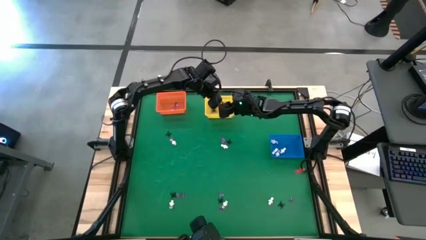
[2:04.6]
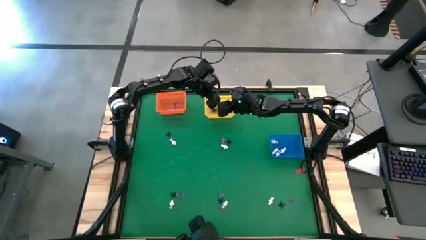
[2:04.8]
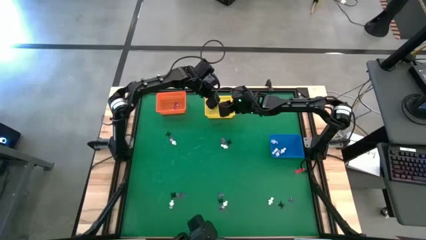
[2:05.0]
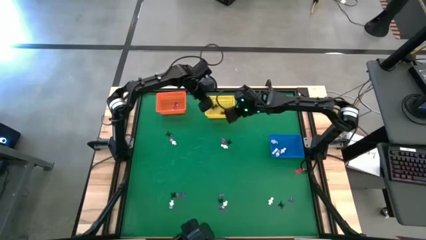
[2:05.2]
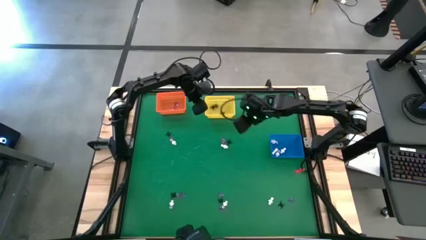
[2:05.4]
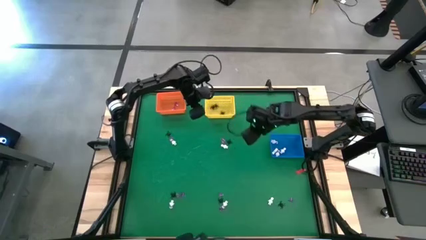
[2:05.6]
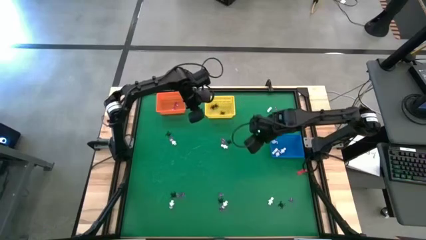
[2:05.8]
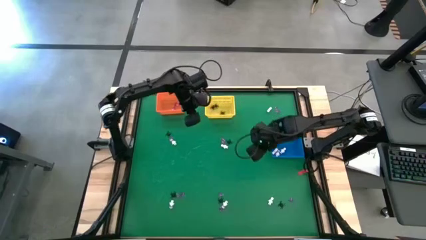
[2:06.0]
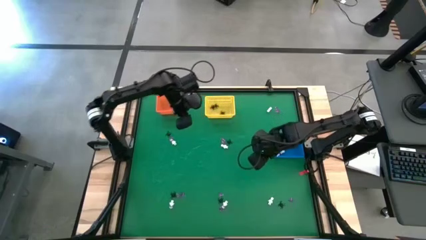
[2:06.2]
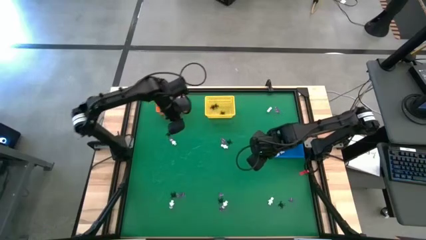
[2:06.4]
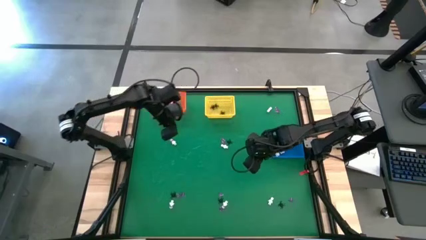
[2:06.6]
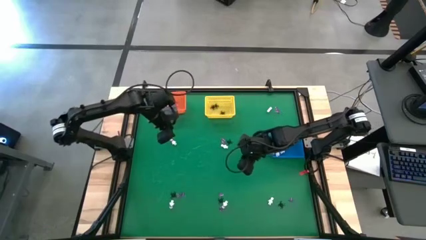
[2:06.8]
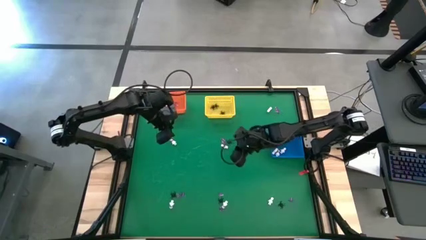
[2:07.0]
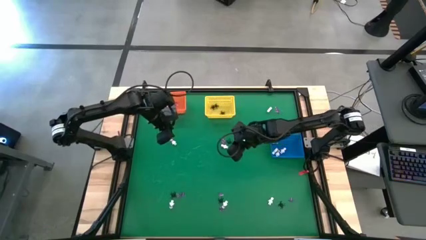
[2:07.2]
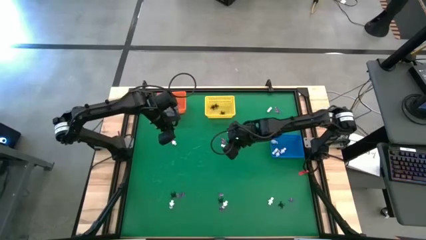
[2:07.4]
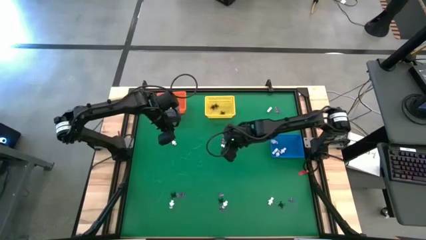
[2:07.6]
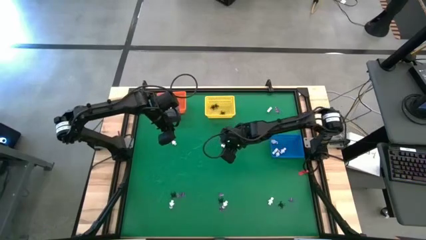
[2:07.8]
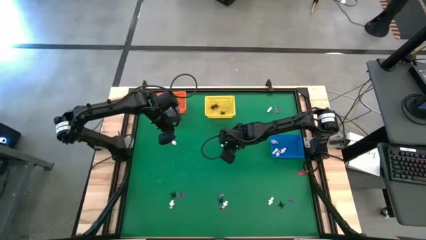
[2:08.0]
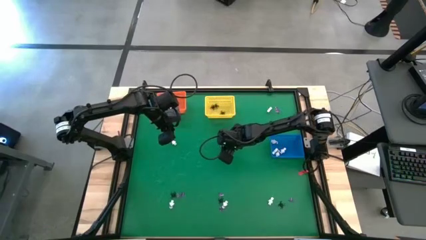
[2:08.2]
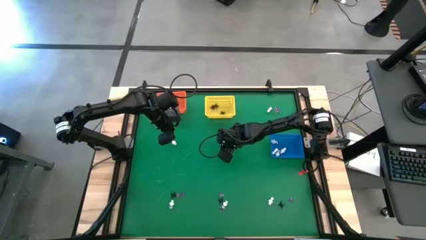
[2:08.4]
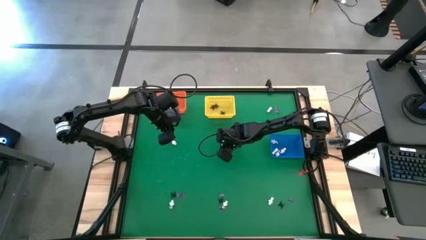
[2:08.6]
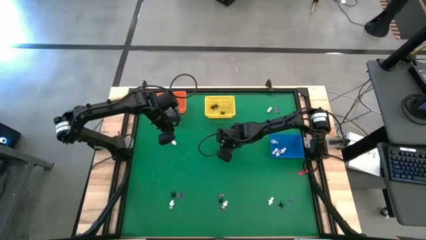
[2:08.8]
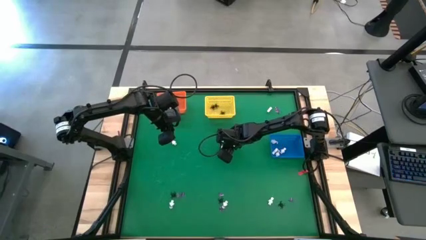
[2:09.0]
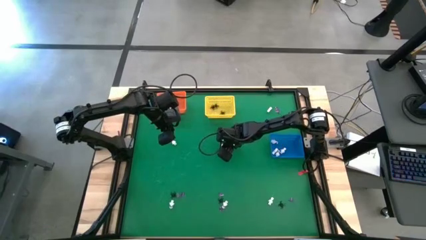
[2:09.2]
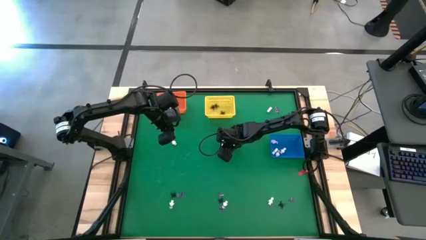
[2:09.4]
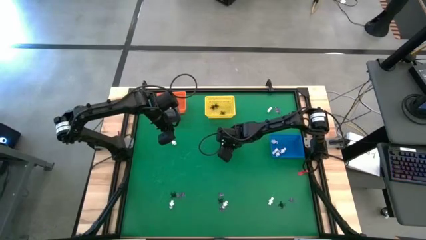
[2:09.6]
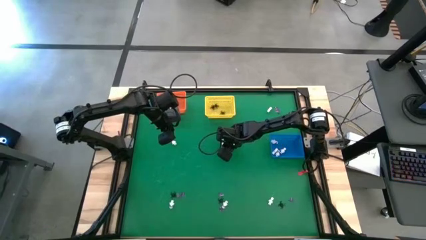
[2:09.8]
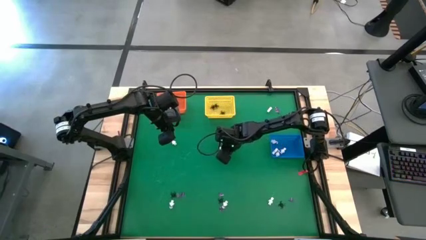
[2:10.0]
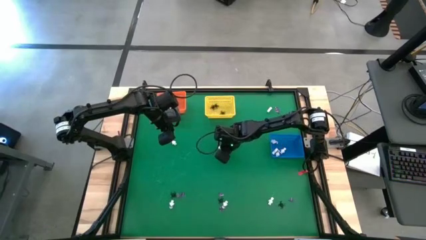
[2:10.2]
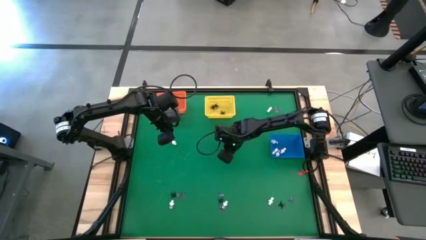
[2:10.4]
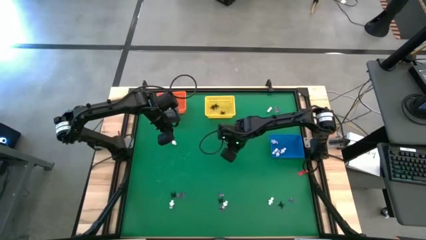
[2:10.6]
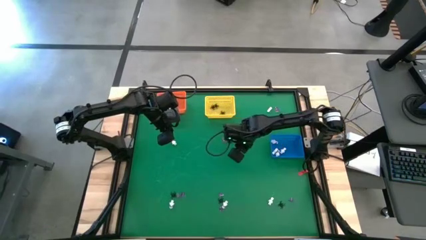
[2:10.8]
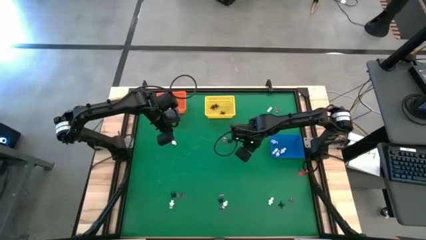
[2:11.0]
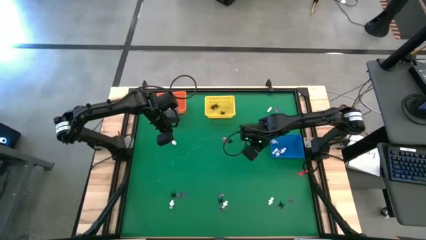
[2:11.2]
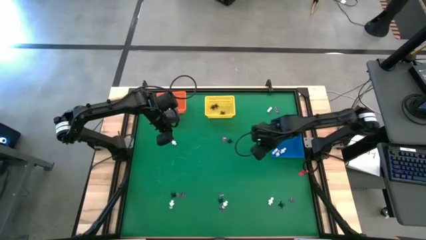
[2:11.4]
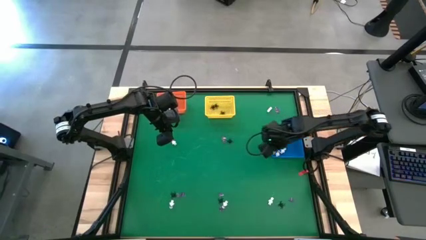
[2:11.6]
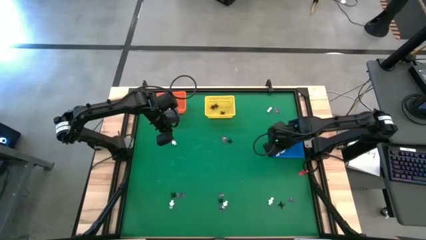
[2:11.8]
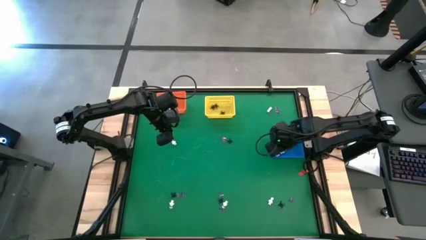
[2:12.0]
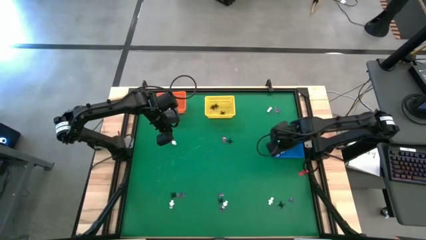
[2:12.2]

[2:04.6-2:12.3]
Task: Sort Halloween decoration
Put the white skeleton toy into the blue basket

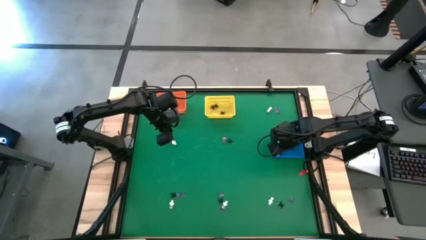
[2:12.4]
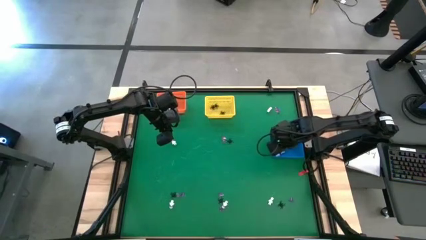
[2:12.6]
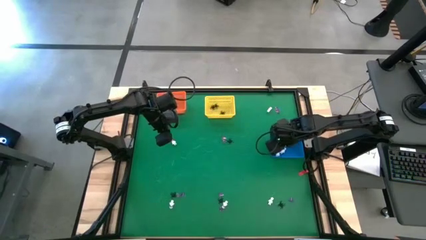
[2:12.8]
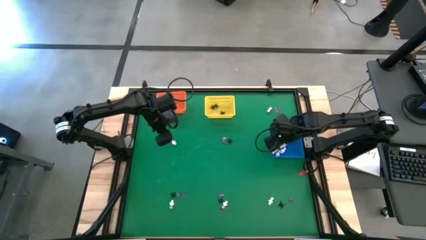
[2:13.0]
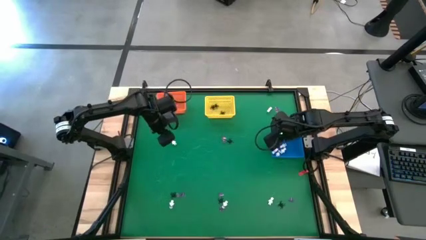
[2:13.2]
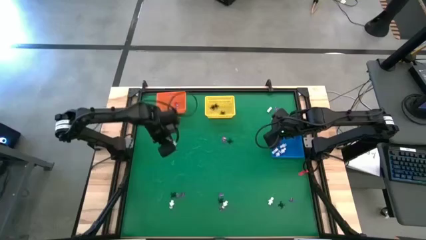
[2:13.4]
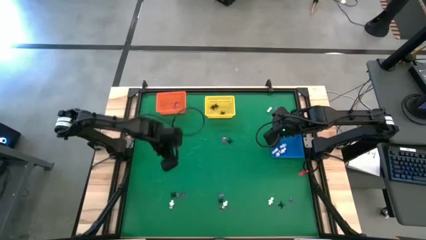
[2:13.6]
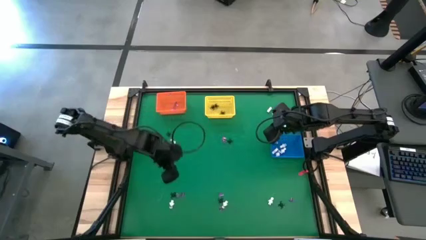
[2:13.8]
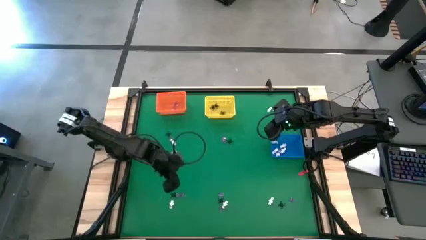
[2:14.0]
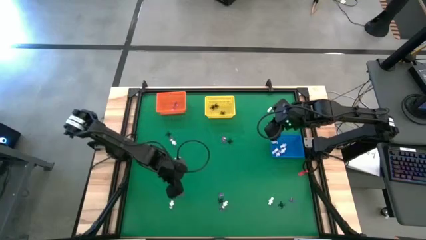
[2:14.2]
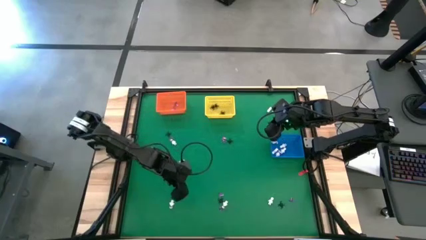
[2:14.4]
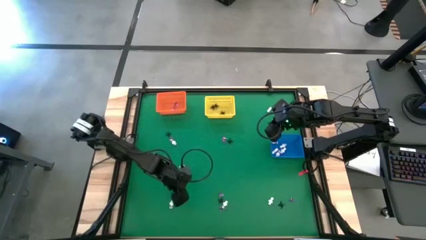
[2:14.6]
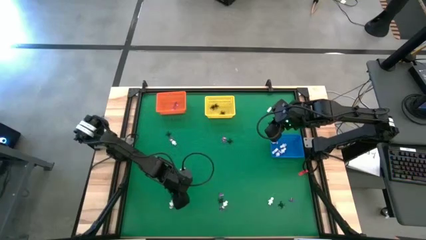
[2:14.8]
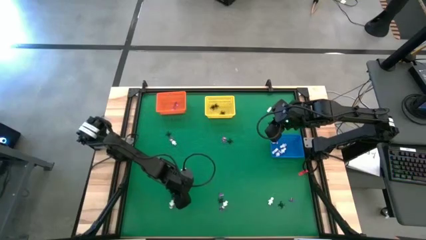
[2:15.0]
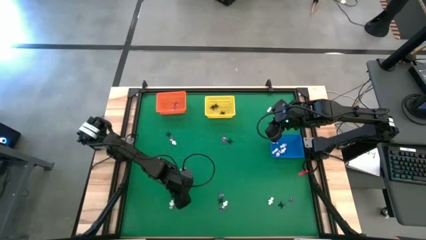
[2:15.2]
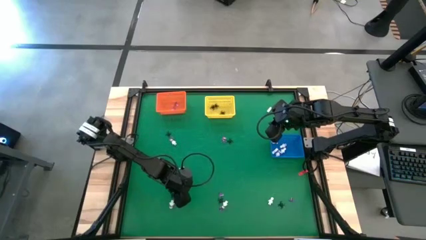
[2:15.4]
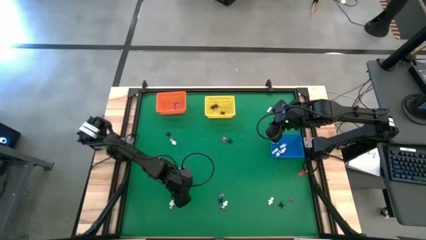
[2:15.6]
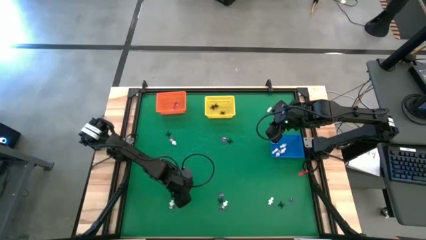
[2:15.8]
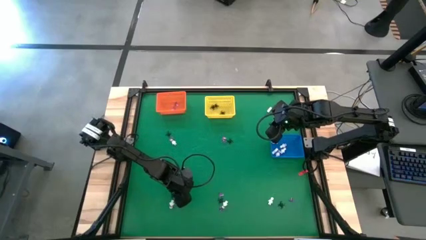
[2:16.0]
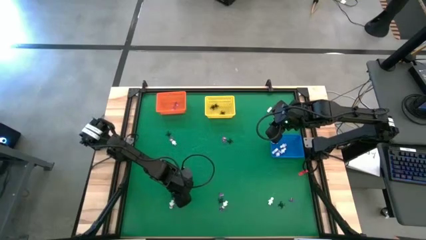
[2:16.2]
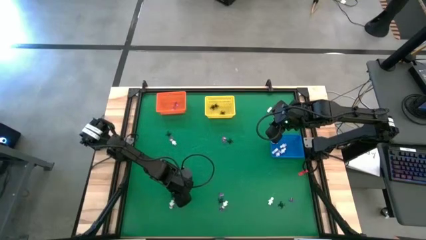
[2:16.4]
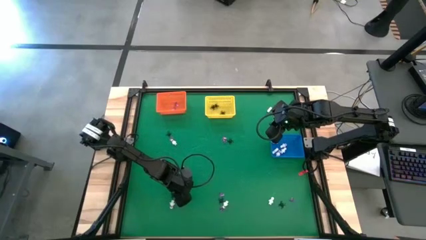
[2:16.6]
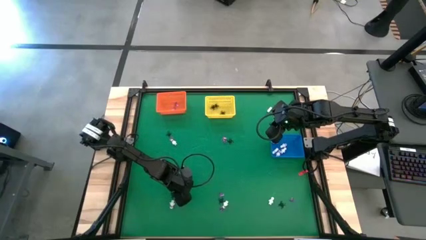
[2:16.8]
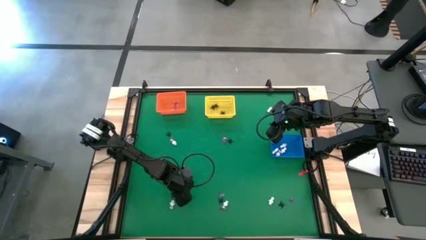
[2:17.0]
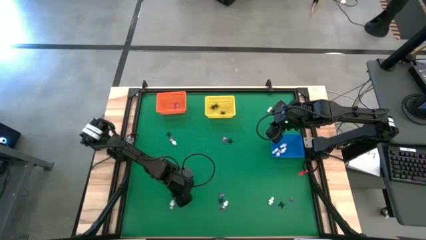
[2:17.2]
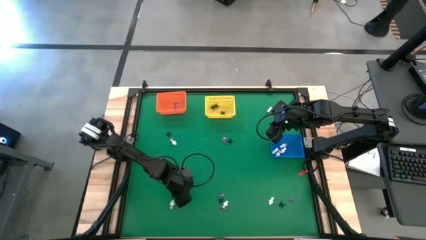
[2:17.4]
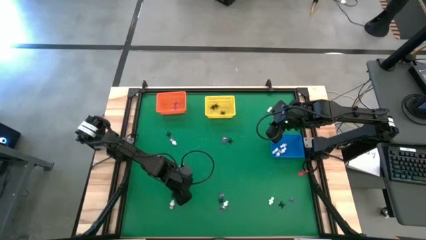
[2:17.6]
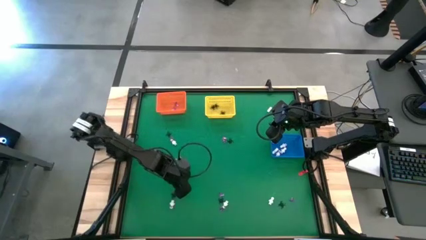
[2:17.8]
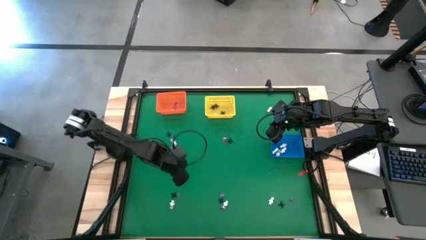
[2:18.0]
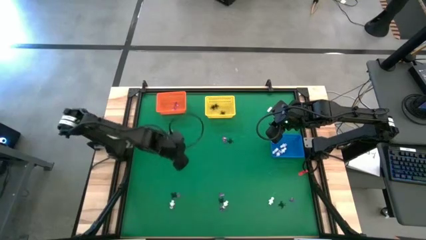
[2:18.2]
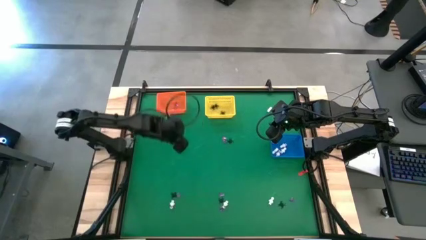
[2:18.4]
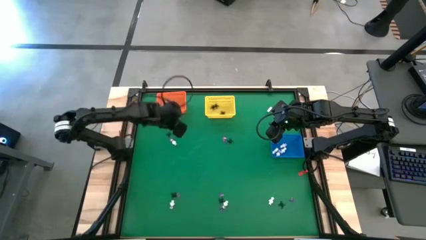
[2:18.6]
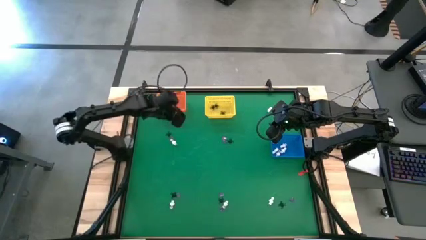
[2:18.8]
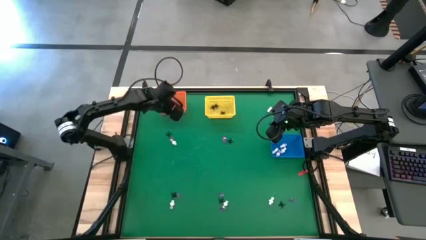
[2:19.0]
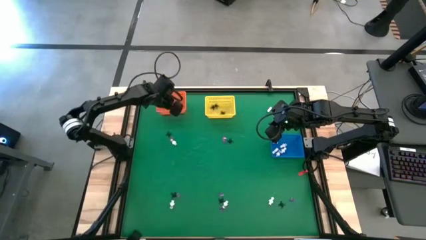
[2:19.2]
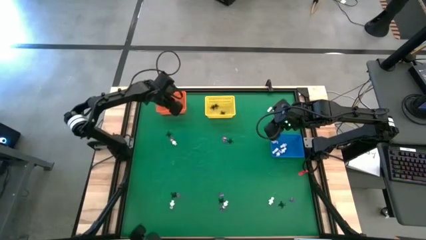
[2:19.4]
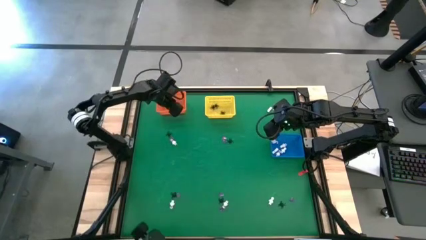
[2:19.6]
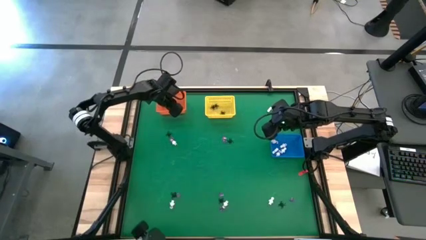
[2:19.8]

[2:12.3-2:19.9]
Put the violet hat toy into the orange basket

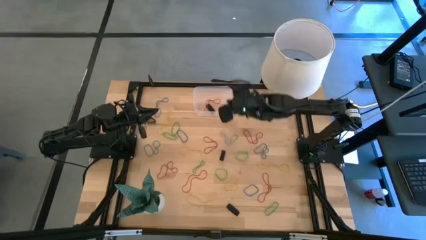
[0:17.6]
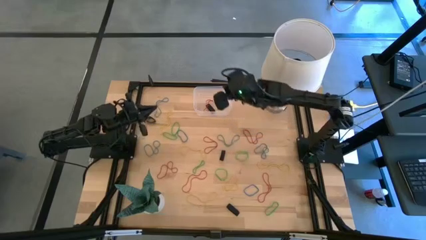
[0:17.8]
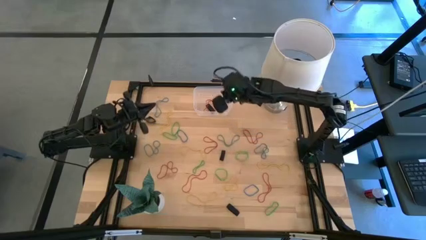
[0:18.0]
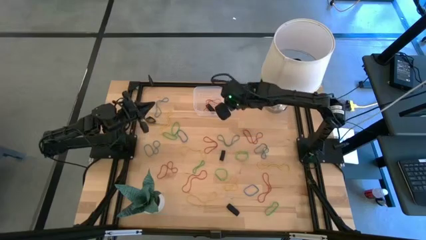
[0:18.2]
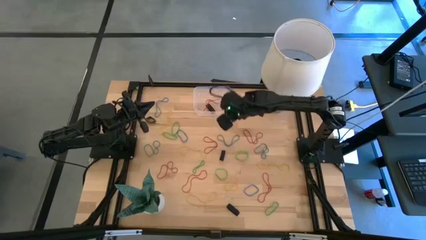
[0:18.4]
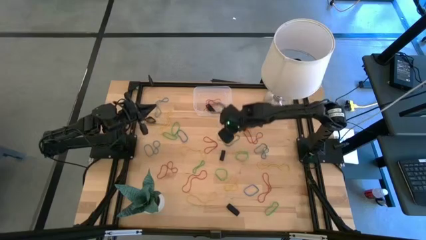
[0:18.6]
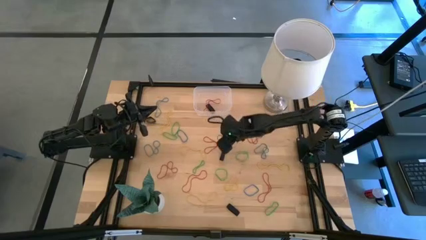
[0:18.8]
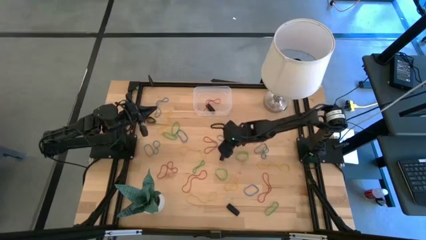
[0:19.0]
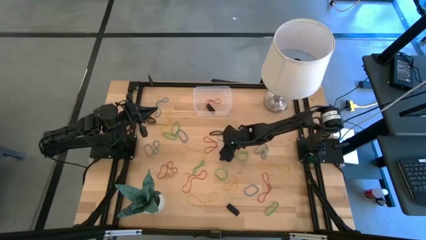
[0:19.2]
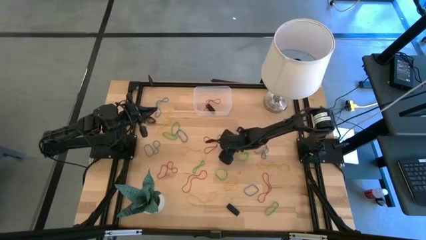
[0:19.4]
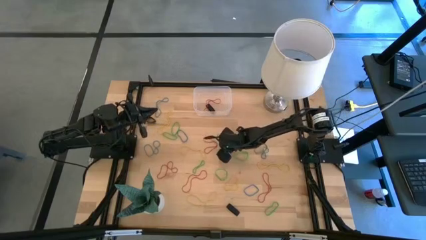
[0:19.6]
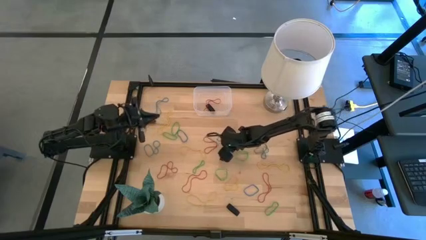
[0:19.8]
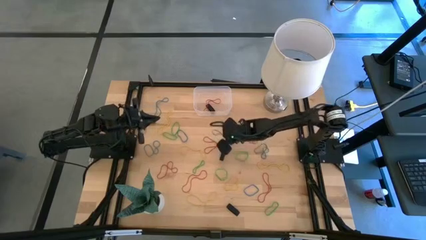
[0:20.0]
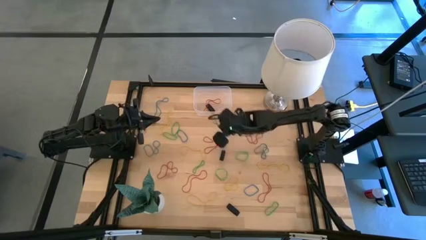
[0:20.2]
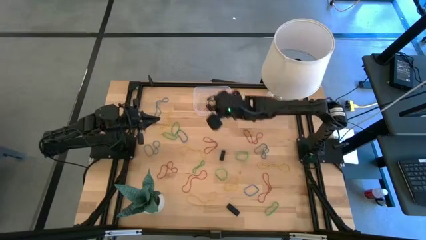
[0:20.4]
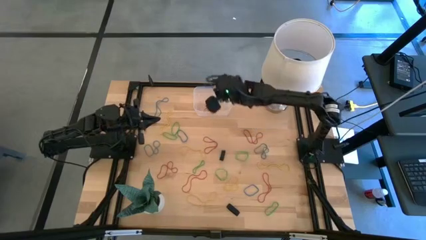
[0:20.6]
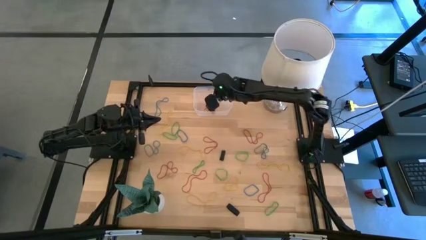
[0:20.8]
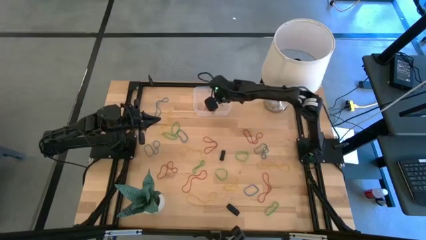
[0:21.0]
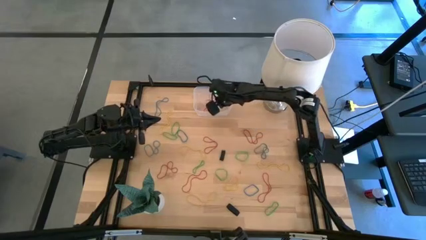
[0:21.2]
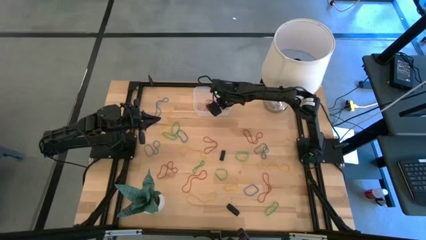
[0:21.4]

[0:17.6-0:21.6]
Task: Pick and place rubber bands into bin
Put the blue rubber band into the transparent bin
